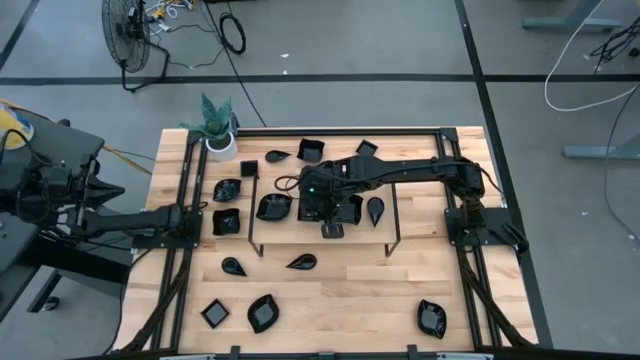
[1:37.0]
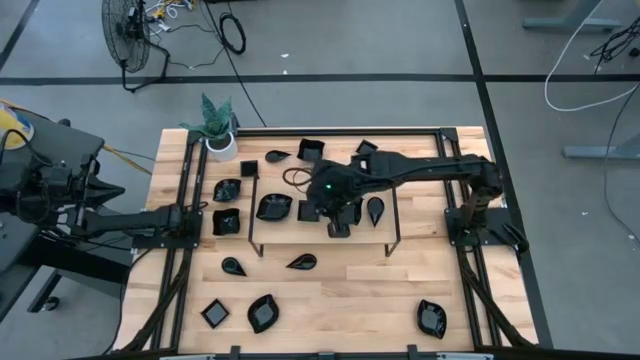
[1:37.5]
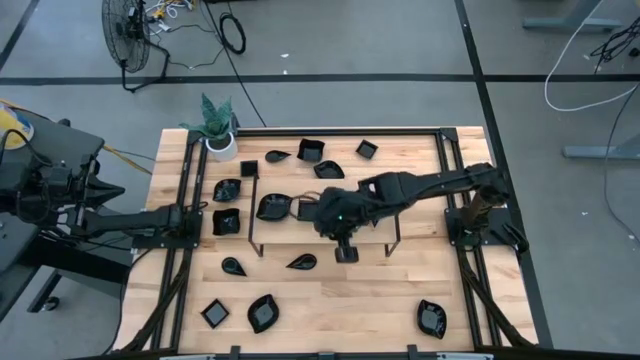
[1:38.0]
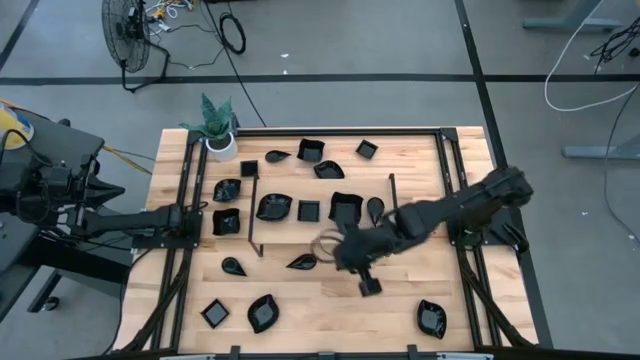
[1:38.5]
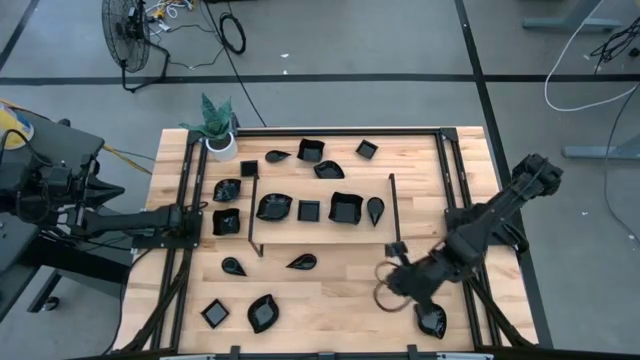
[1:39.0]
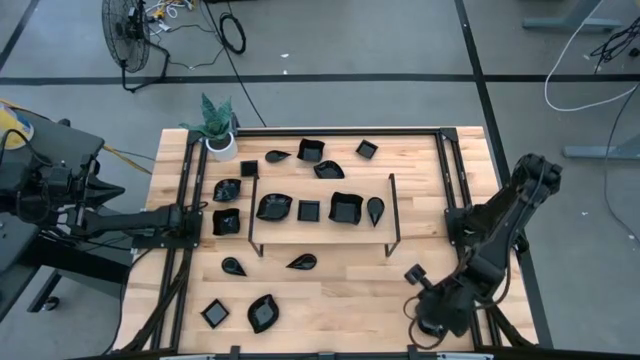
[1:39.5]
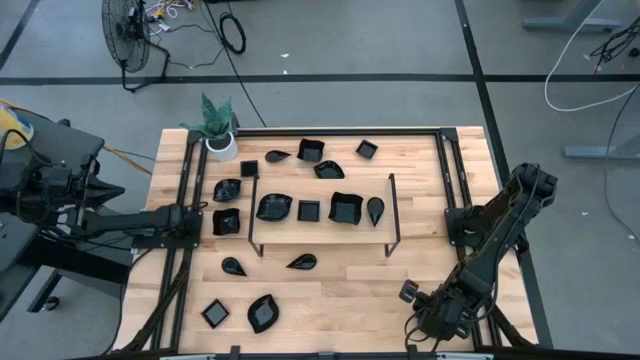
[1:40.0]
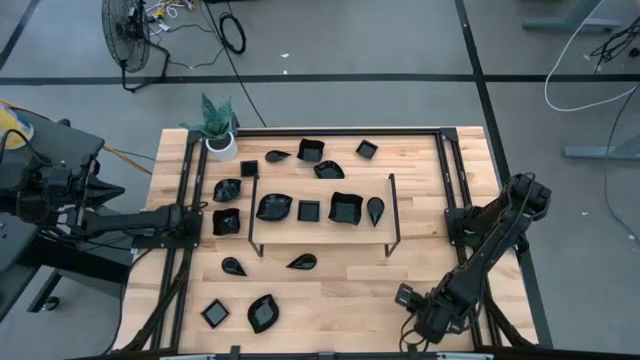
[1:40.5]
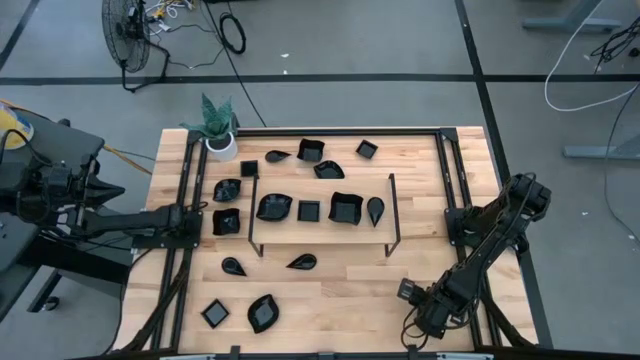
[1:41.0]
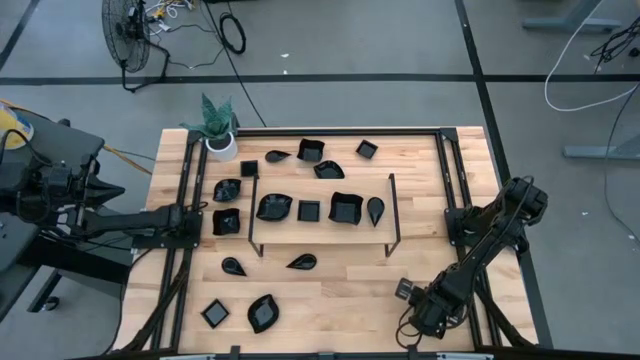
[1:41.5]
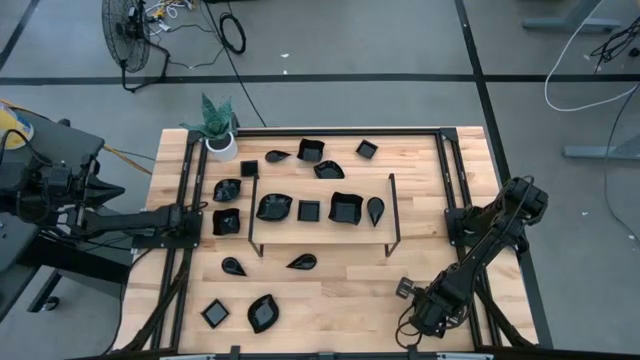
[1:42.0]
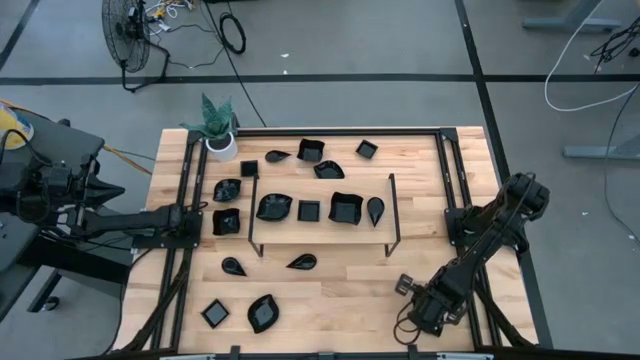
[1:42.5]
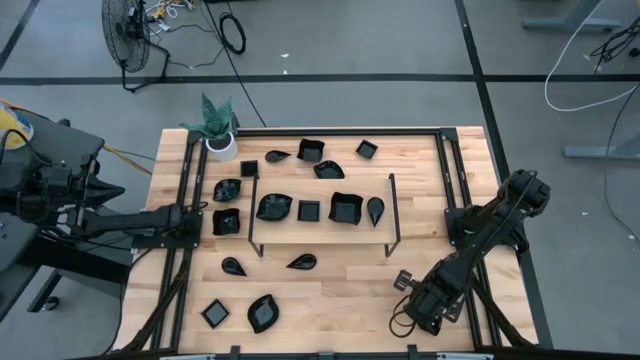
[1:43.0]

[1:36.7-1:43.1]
Task: Pick & Place Mini shaped plates
Stack the leaf shaped plate on top of the leaf shaped plate on the shelf

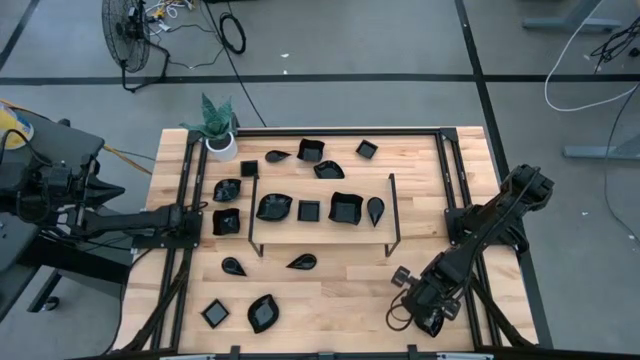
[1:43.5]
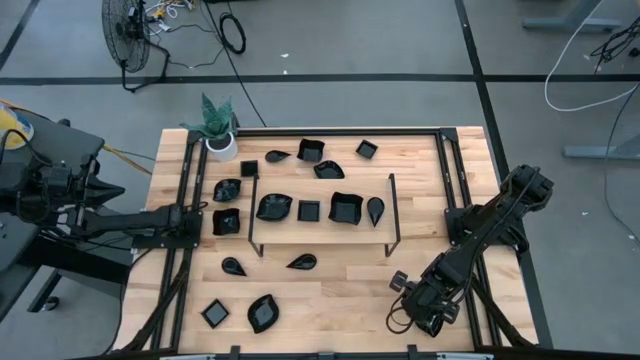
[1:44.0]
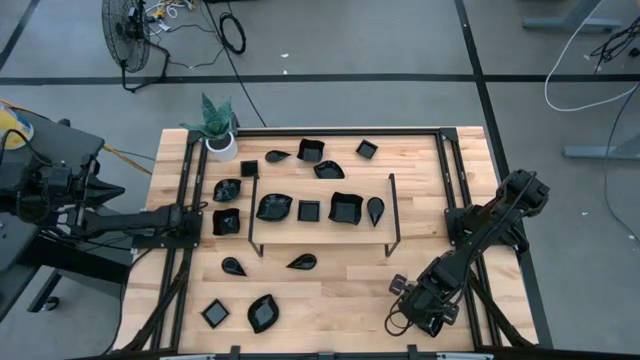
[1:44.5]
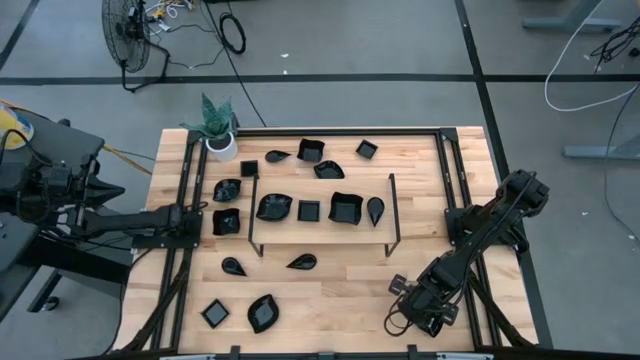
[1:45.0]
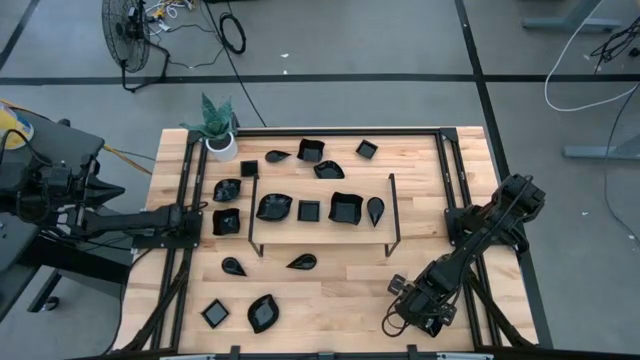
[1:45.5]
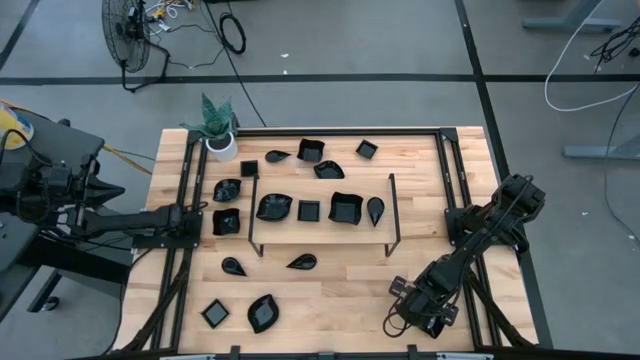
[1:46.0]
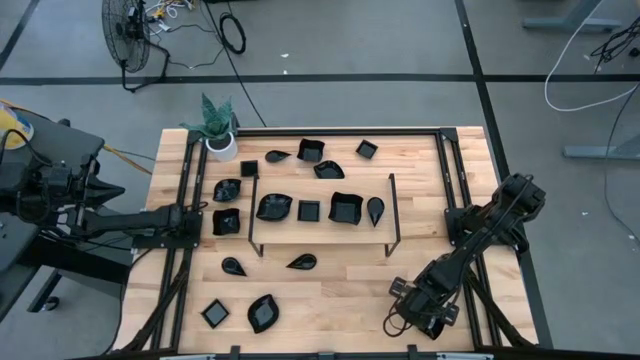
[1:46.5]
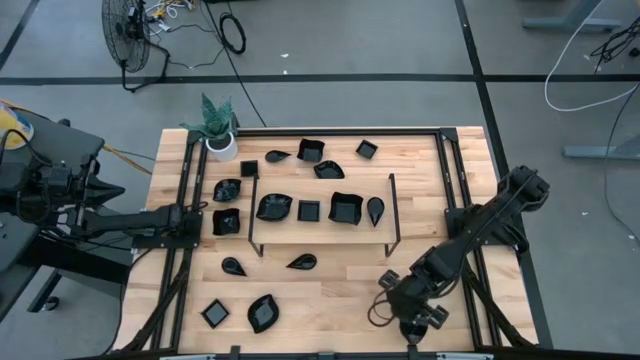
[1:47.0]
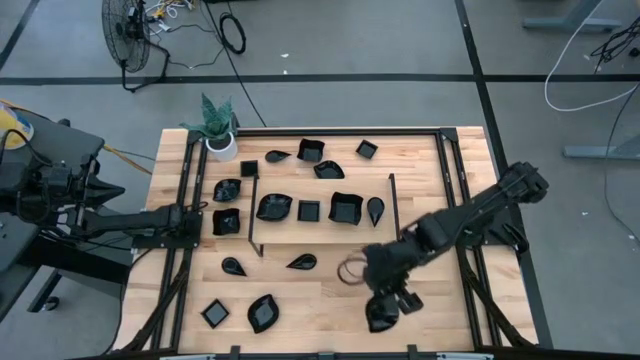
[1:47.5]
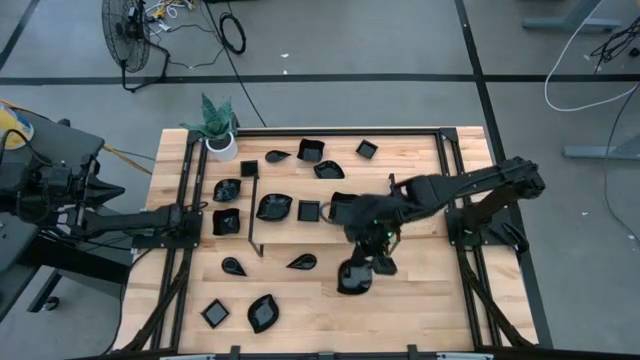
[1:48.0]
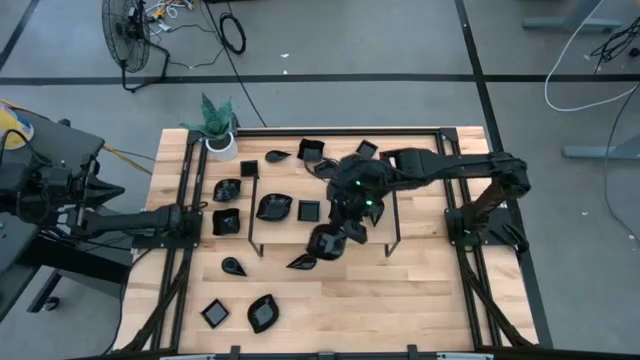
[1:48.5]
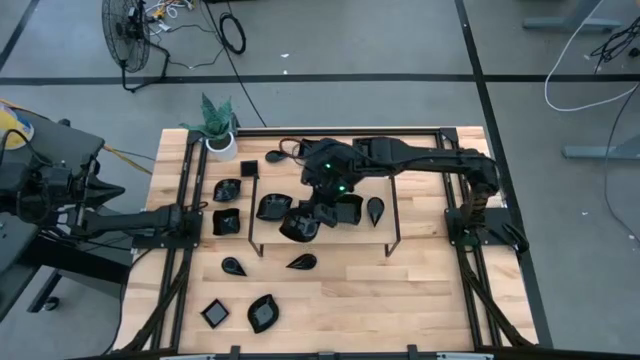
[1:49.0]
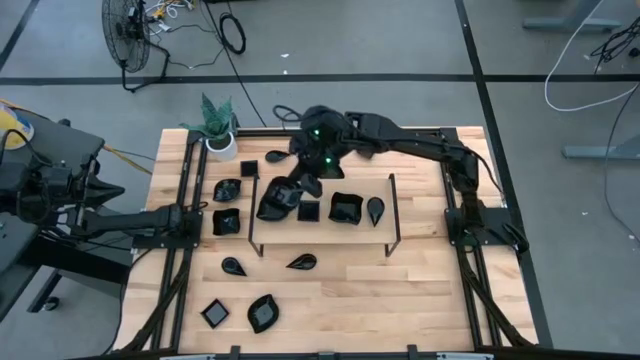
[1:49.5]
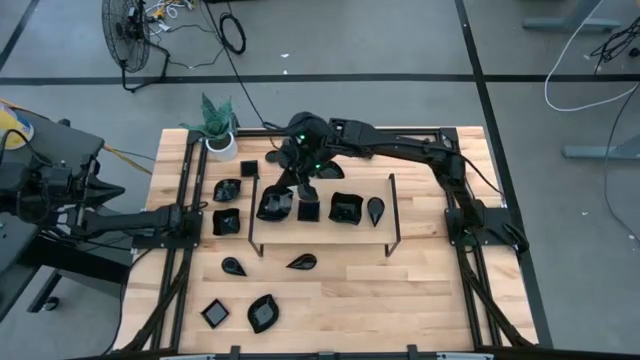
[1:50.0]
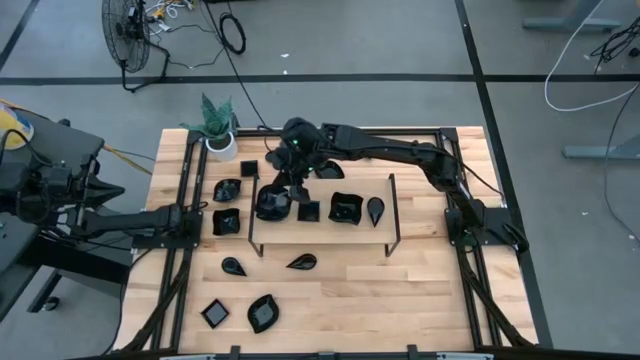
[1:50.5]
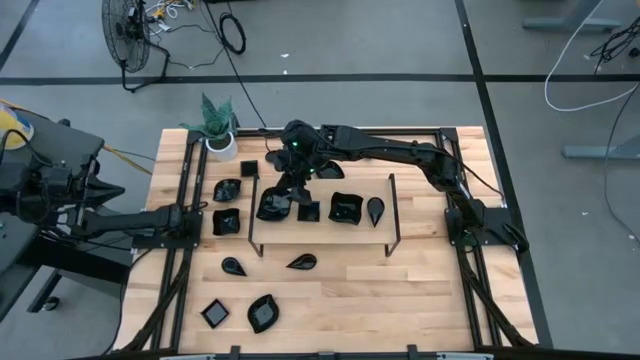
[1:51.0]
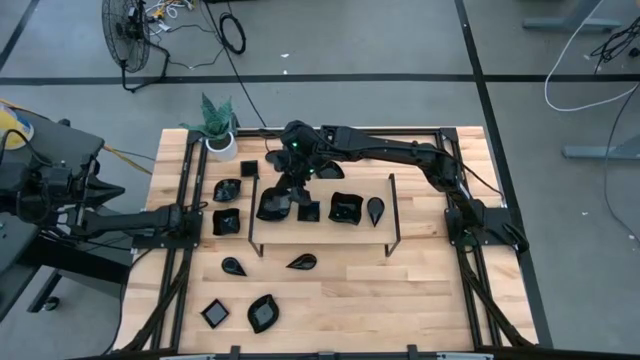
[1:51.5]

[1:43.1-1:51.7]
Stack the leaf shaped plate on top of the leaf shaped plate on the shelf

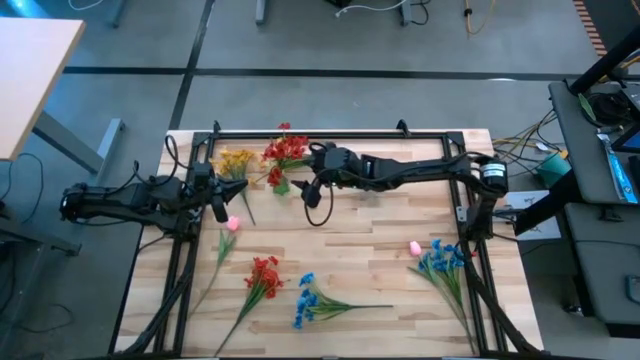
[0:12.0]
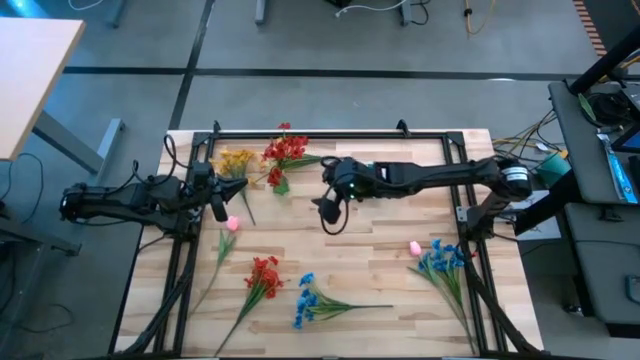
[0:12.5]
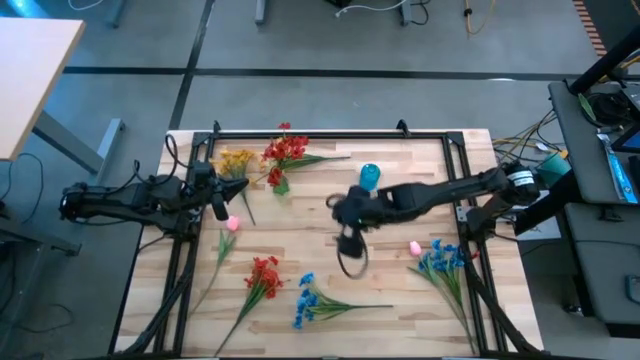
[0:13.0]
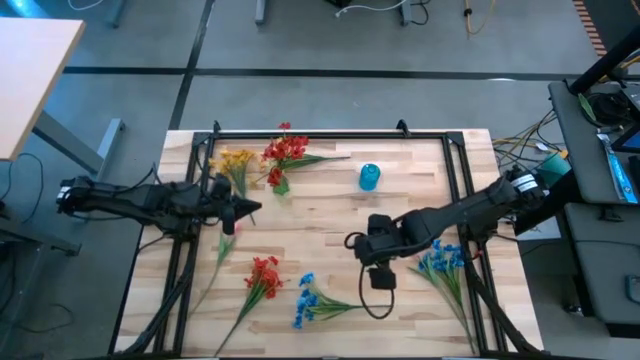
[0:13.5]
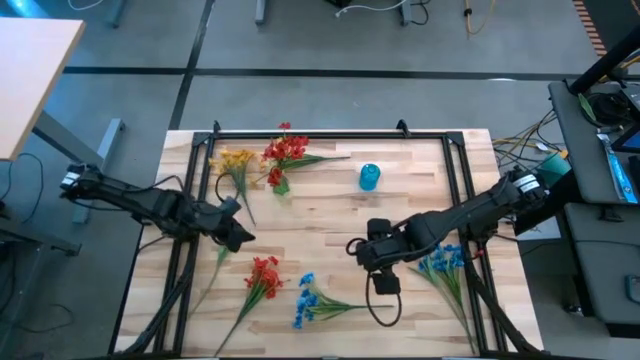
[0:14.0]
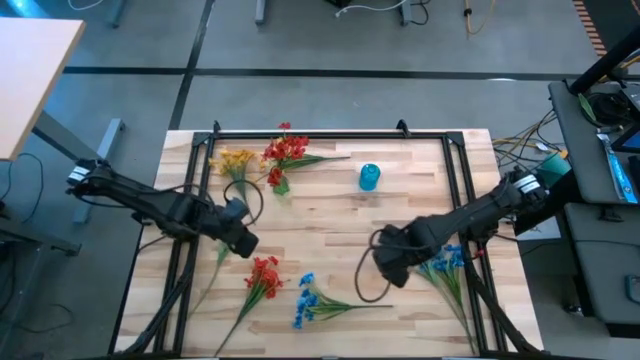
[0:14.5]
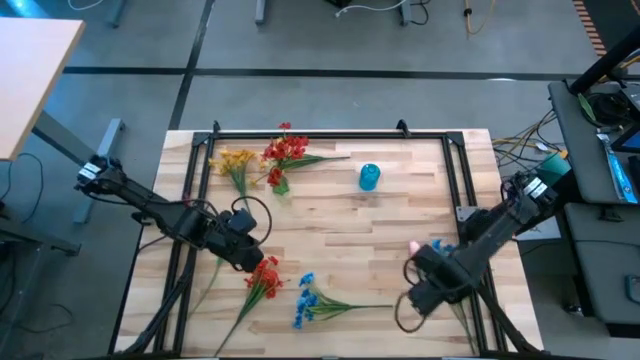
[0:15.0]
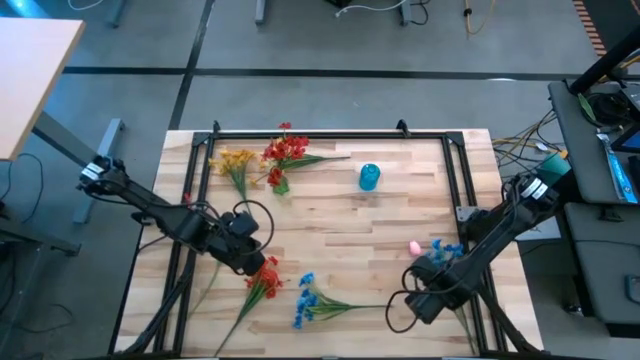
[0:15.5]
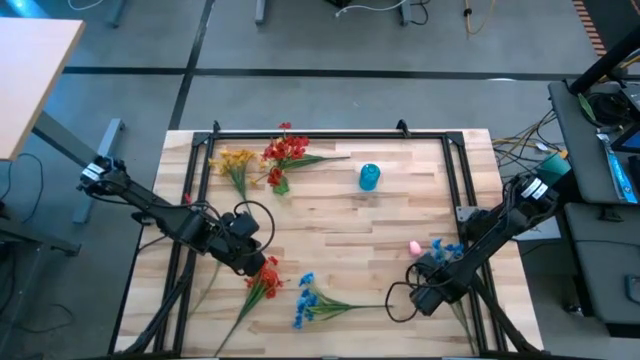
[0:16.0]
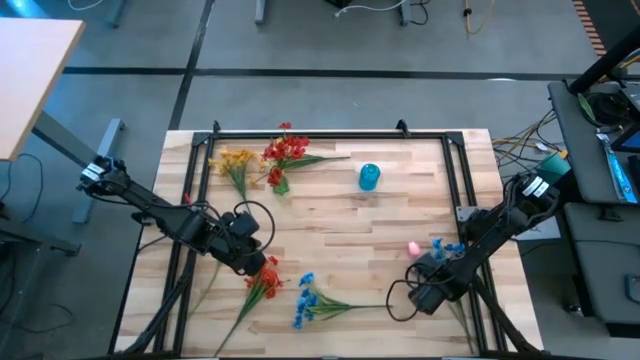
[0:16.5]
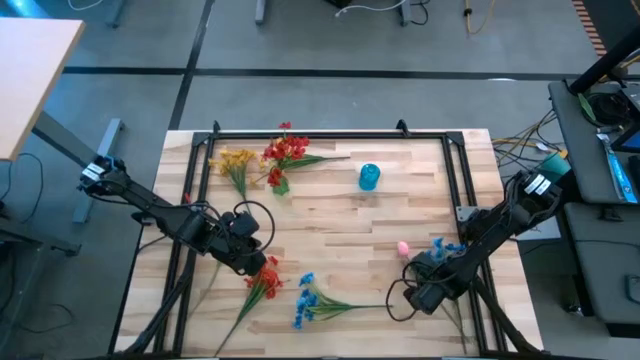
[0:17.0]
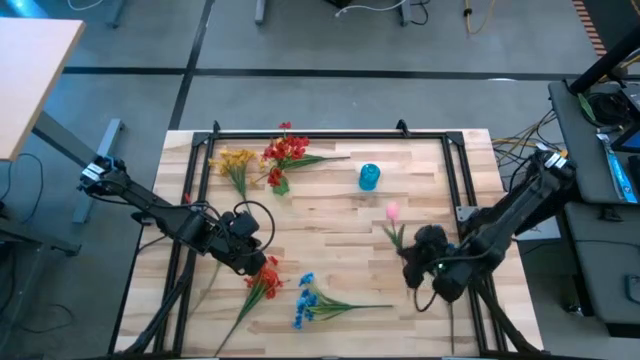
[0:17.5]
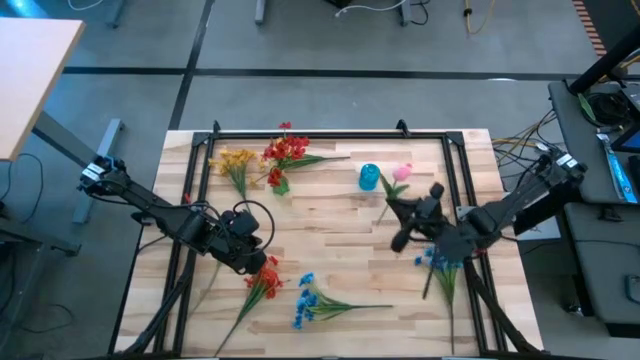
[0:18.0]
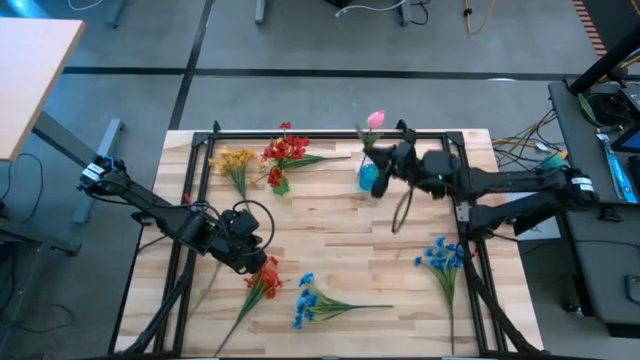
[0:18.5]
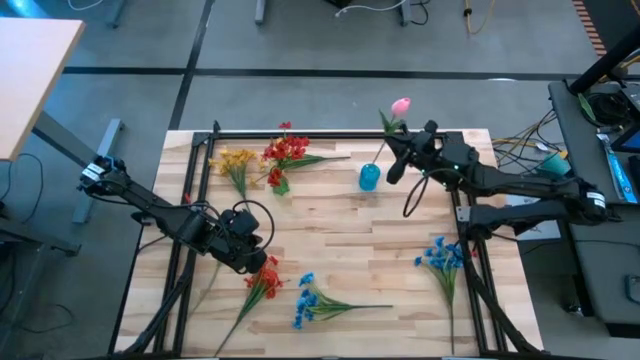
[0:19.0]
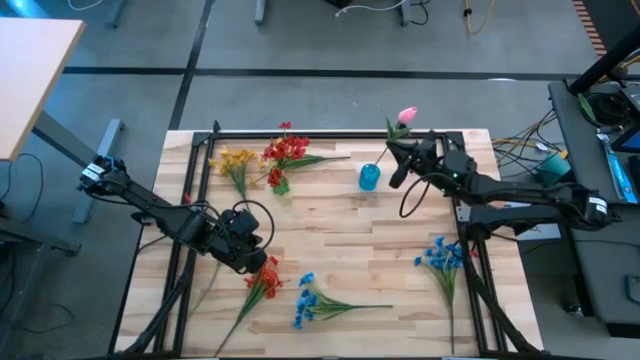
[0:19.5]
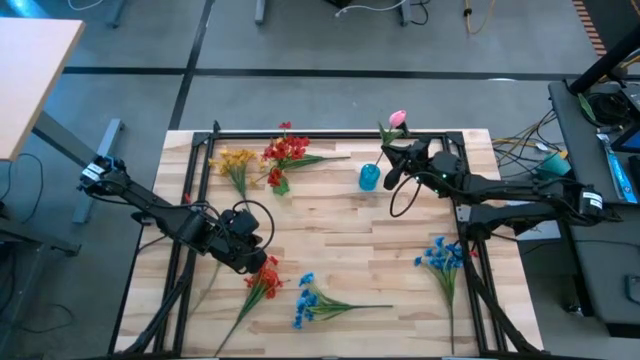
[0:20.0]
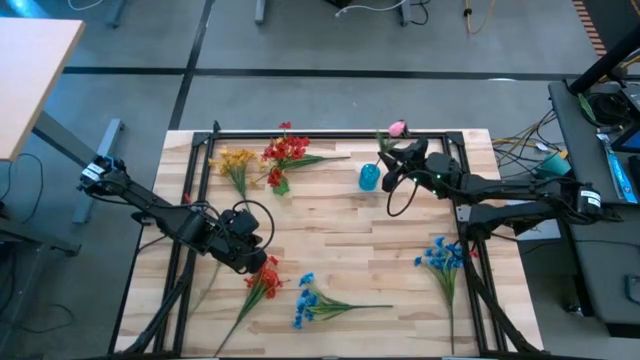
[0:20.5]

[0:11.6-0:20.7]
Task: Sort flowers into vase by color
Put the right pink tulip into the blue vase
